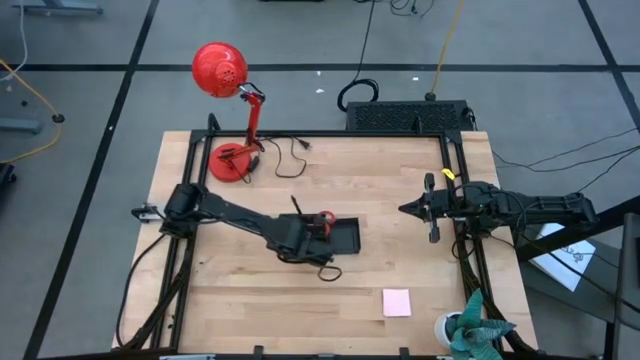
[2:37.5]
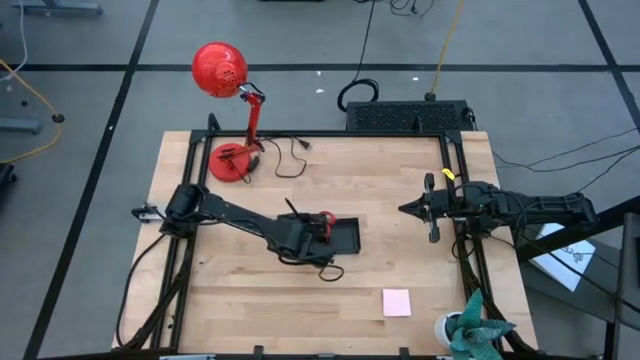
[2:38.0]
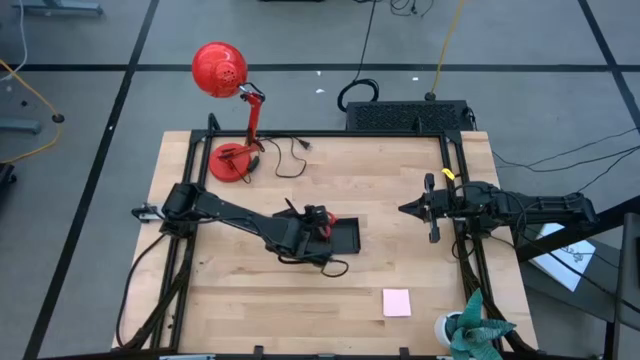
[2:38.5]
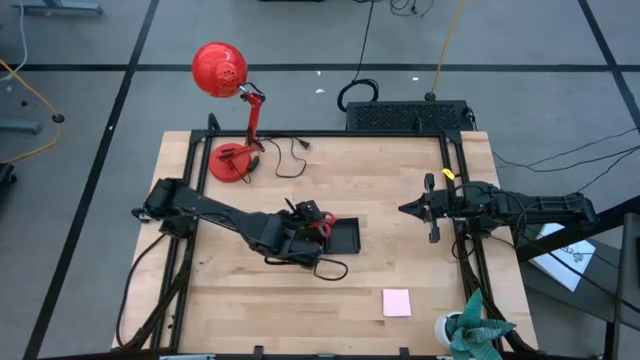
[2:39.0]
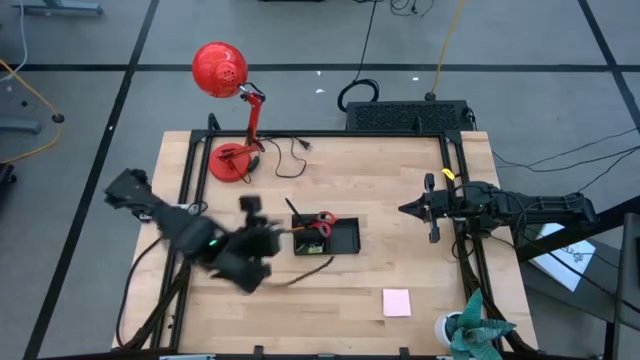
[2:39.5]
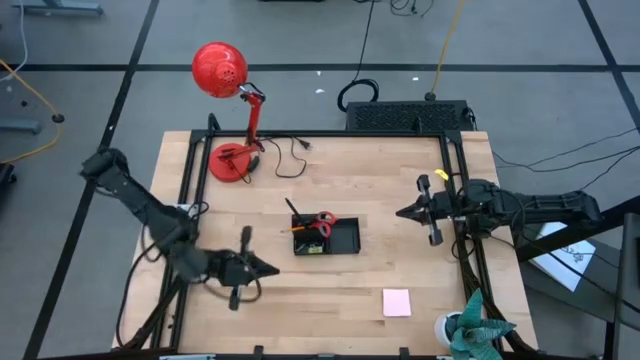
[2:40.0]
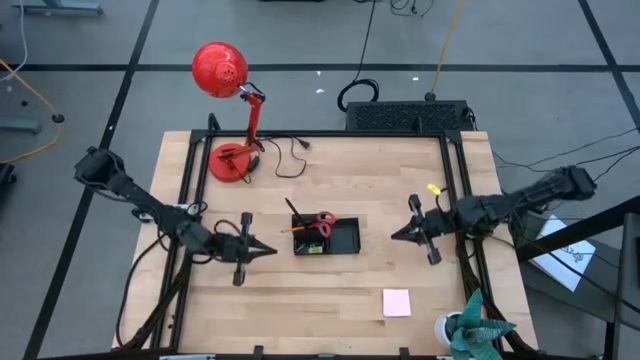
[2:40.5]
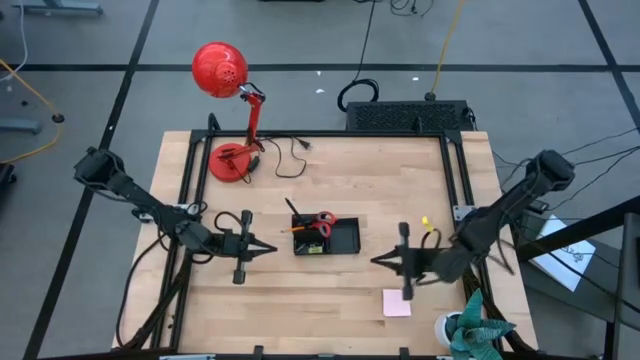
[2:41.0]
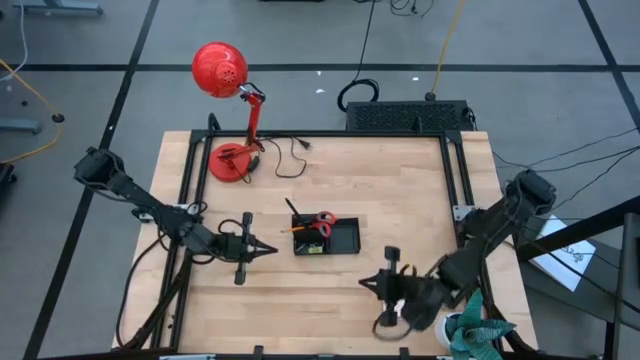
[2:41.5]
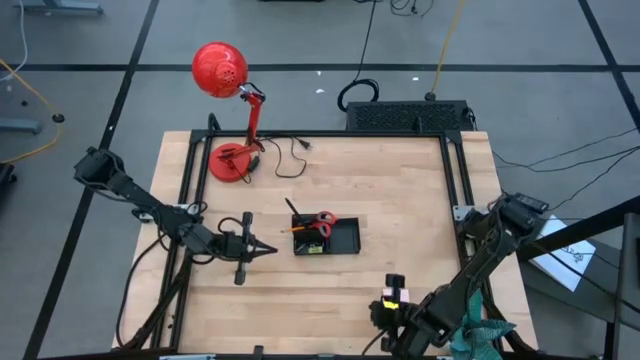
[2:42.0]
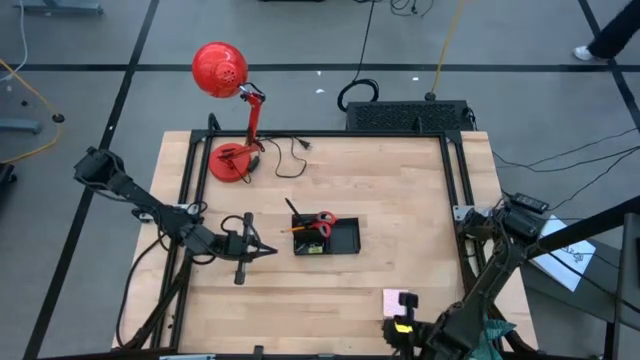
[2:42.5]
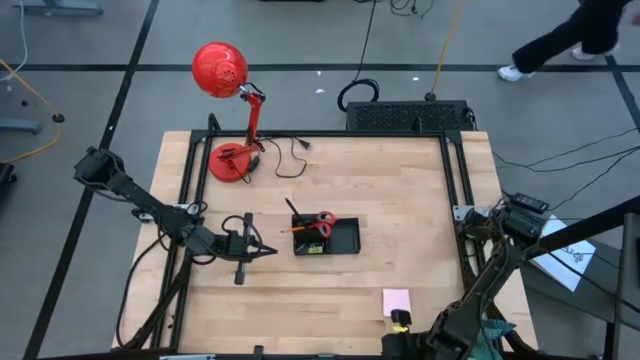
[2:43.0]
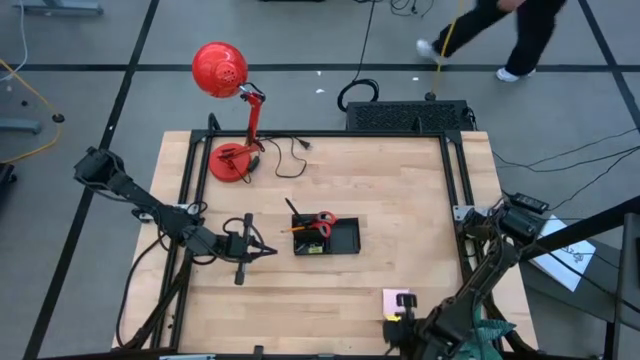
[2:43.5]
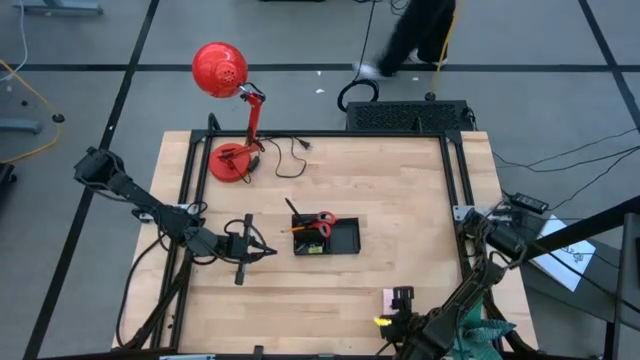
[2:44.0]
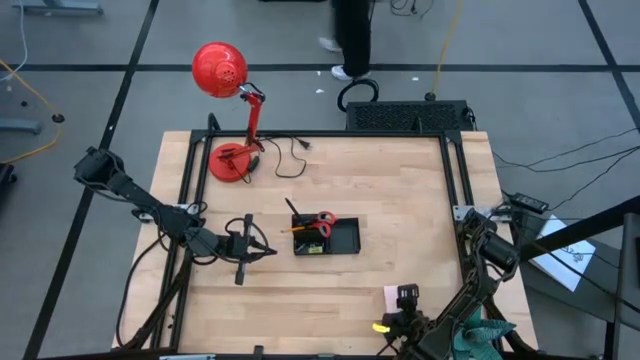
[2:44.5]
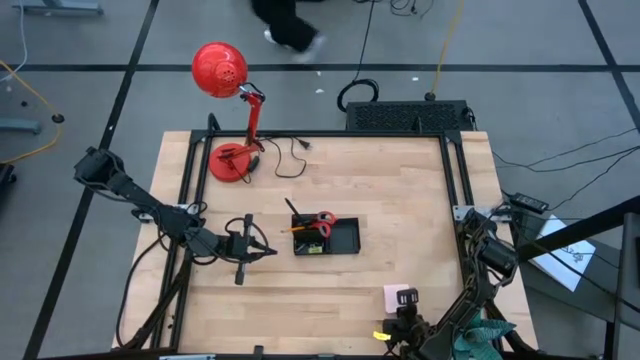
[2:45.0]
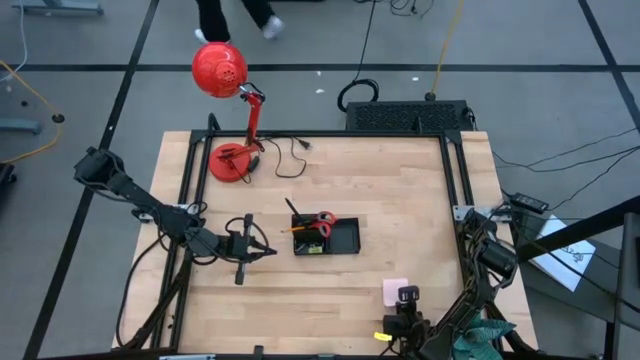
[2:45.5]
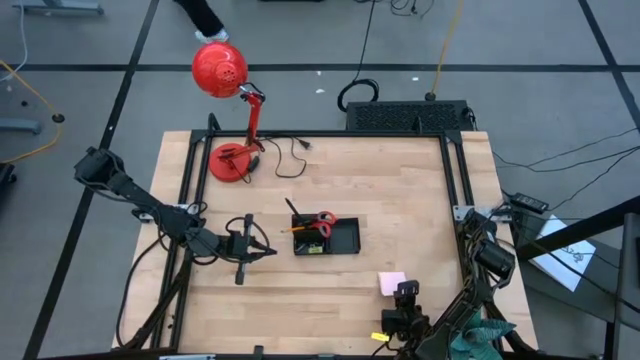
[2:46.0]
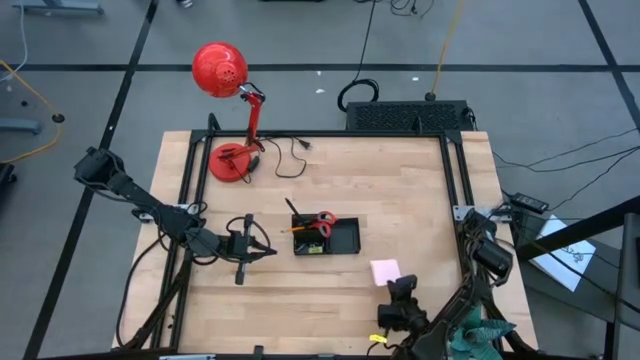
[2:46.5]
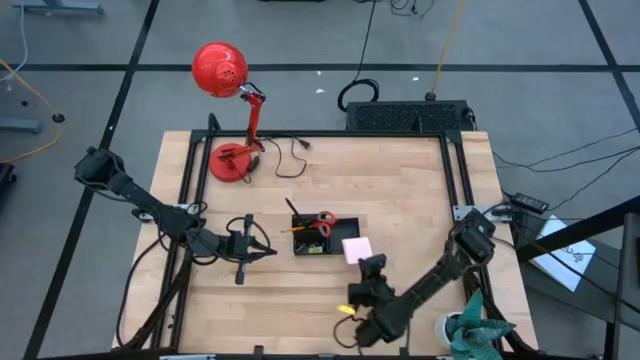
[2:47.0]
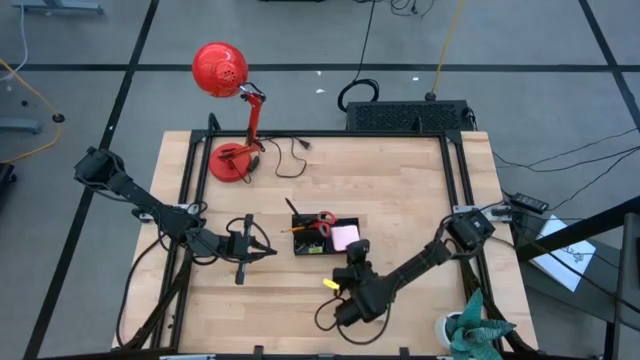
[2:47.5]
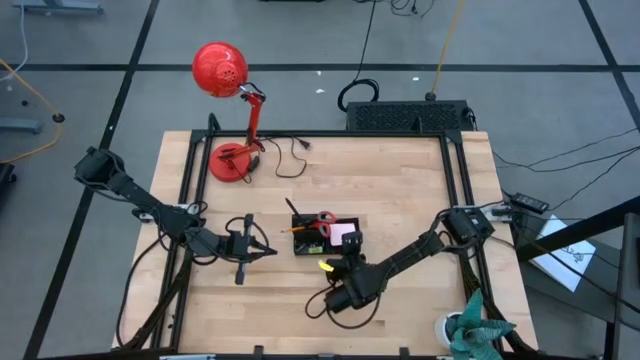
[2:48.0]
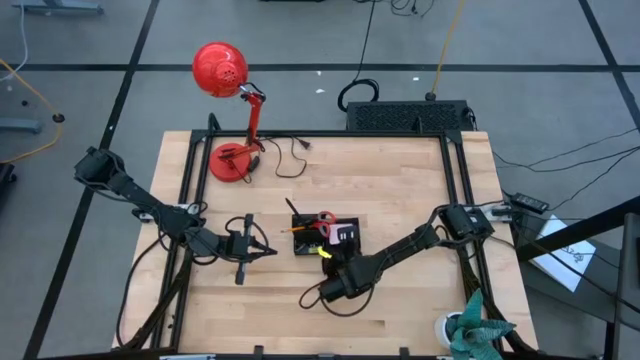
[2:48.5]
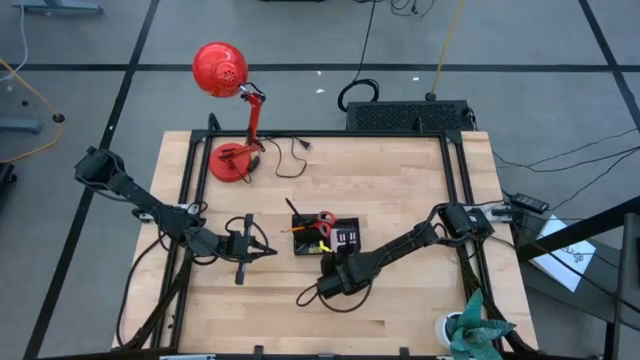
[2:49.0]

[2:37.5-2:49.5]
Task: Pick and place office supplies into organizer
Put the sticky notes into the right section of the desk organizer

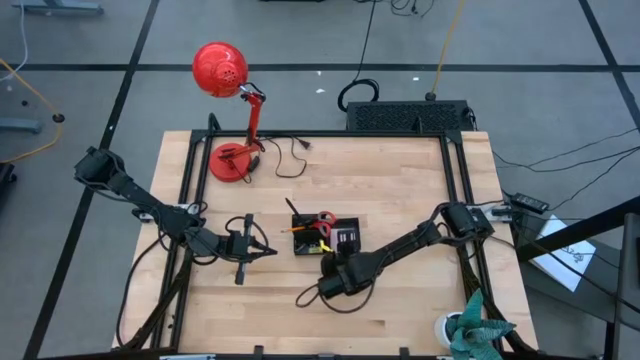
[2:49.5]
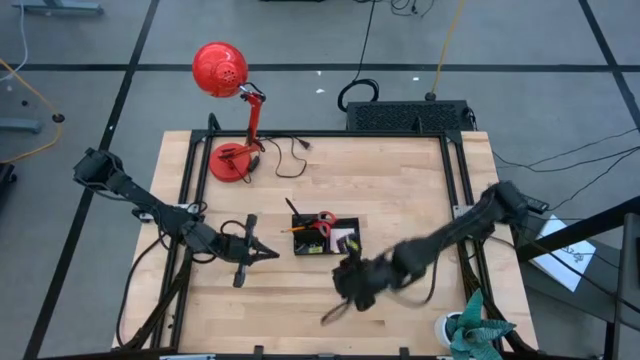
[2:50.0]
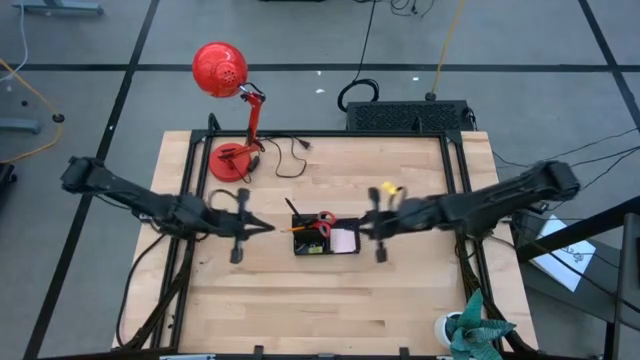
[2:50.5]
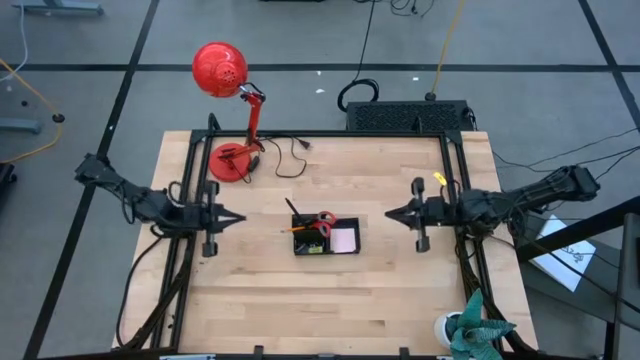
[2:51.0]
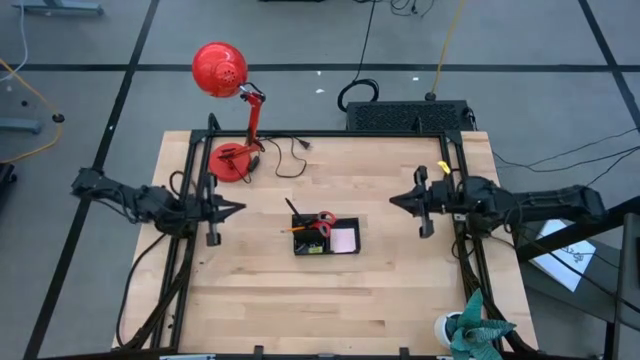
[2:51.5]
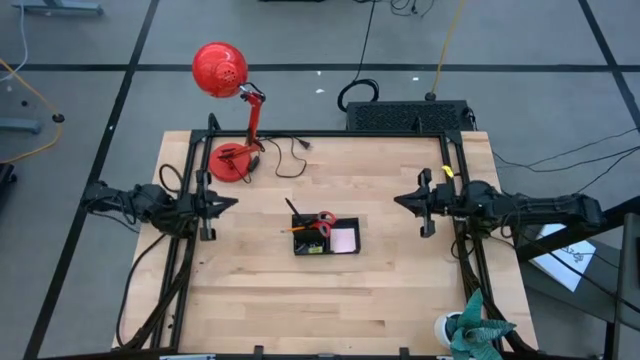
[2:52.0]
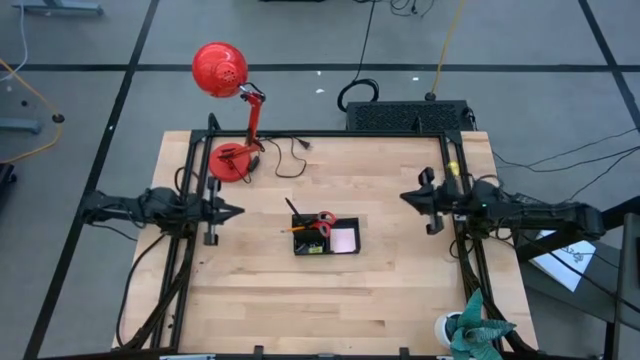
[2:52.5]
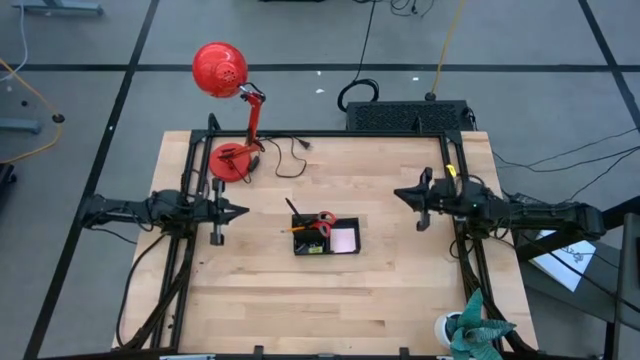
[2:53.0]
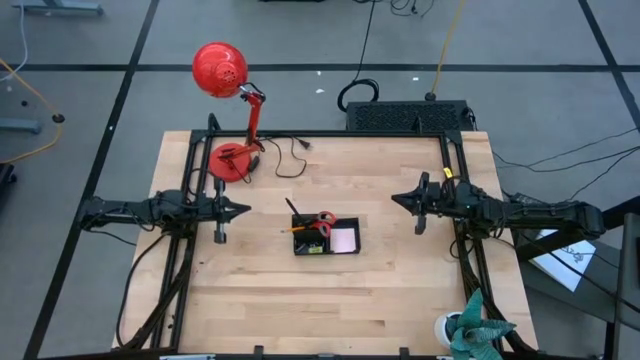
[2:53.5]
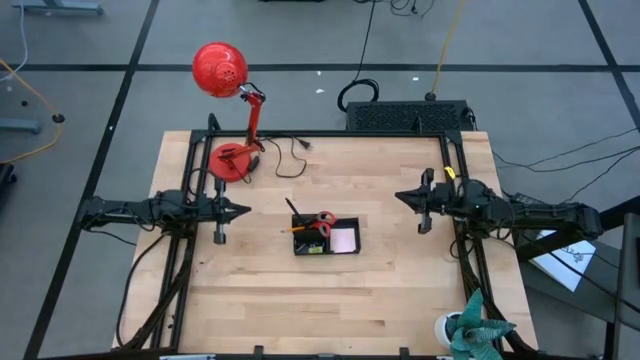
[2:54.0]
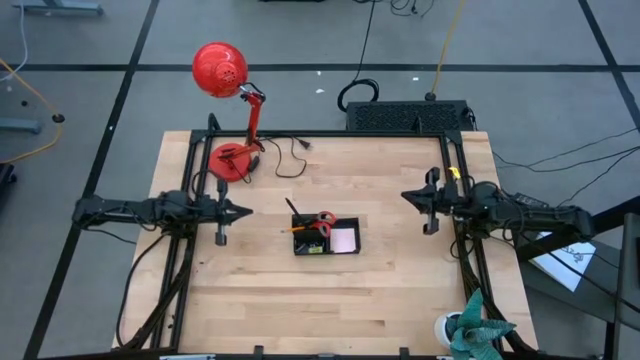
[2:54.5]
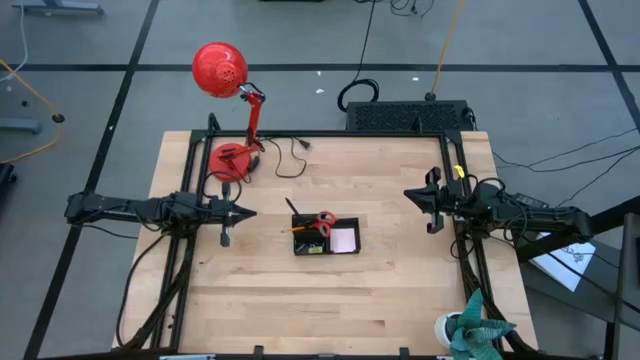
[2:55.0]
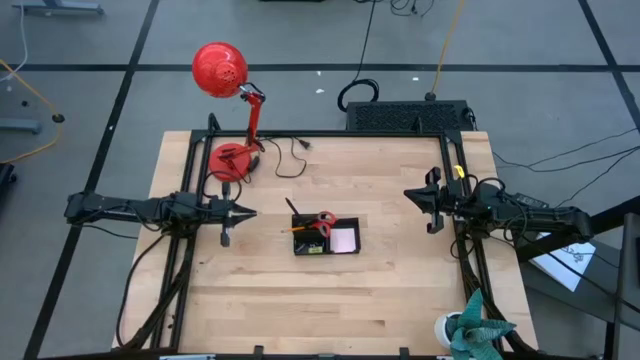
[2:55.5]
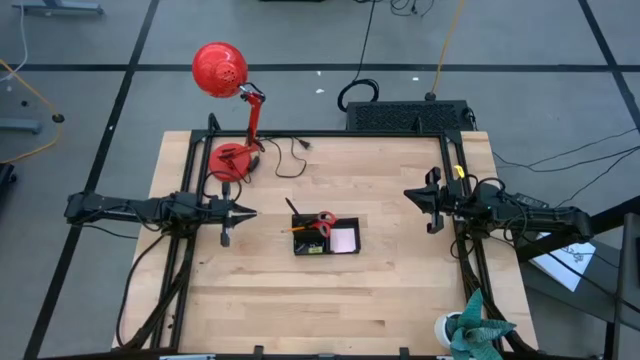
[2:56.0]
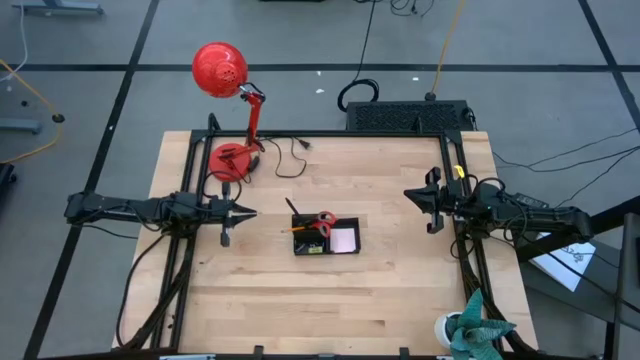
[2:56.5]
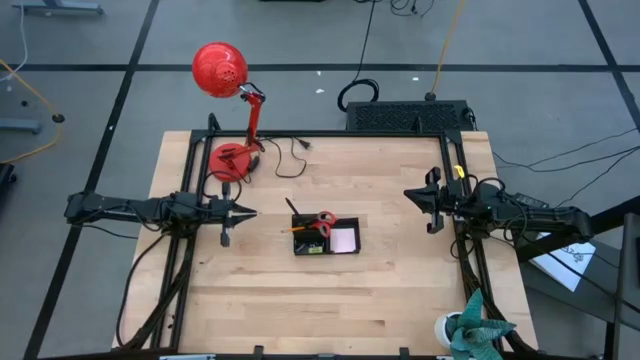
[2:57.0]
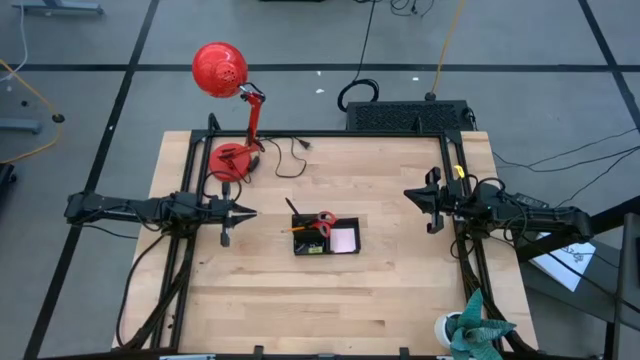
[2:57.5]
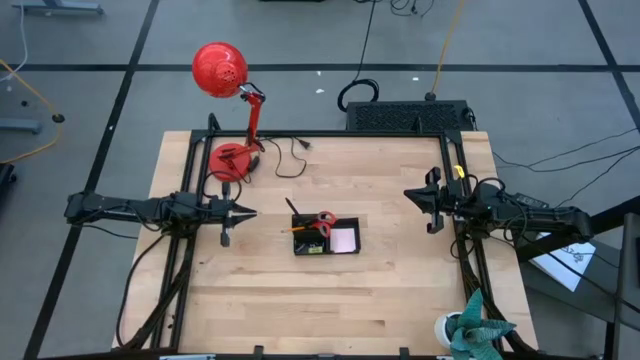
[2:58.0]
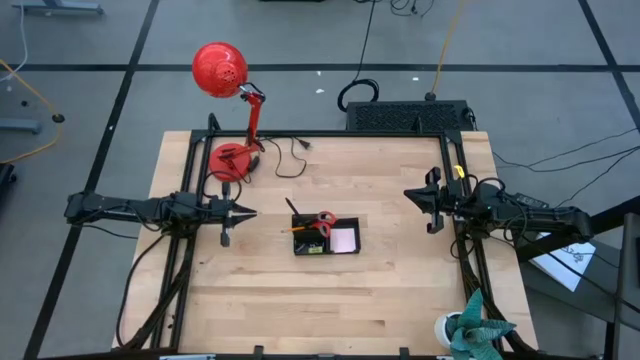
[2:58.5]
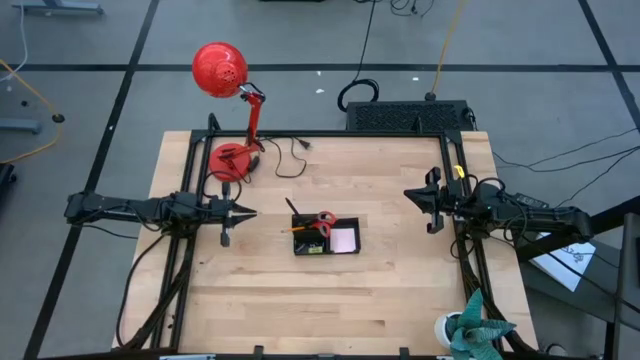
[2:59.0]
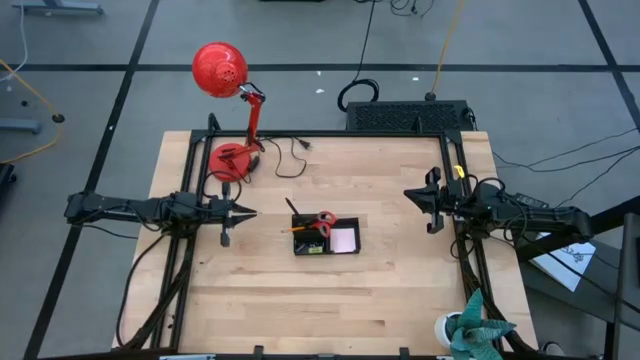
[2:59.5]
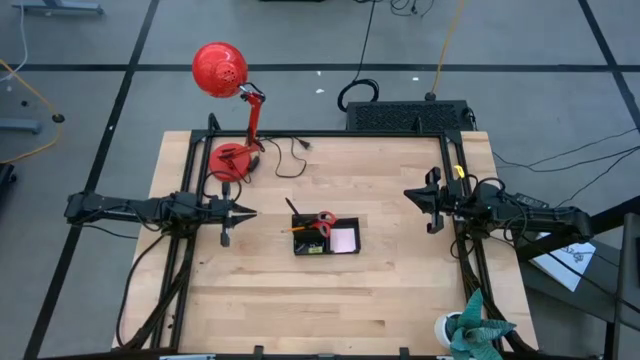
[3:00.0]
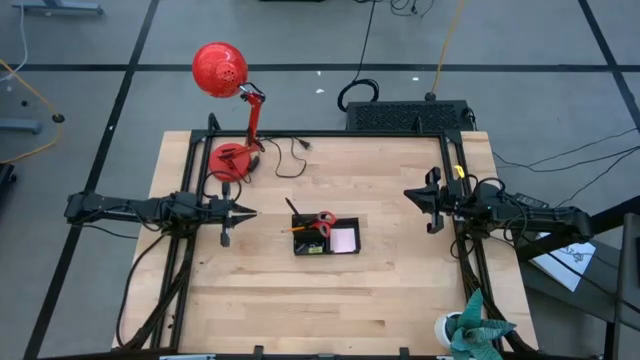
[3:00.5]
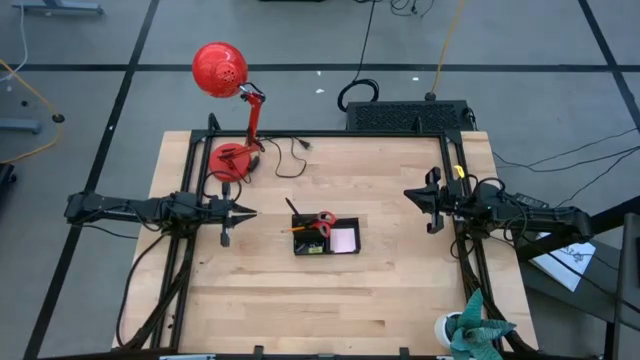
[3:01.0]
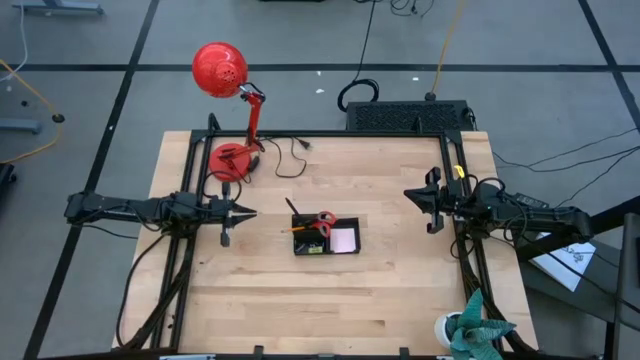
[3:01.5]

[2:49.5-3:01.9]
Return to Home Position
